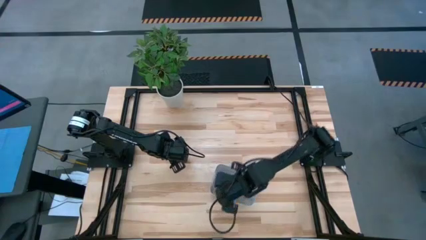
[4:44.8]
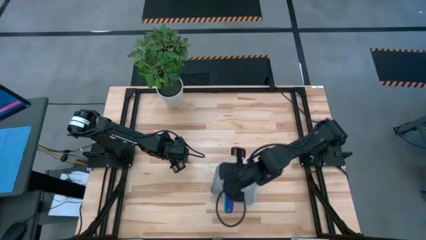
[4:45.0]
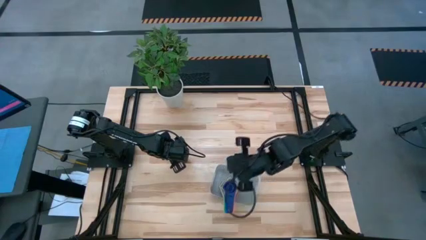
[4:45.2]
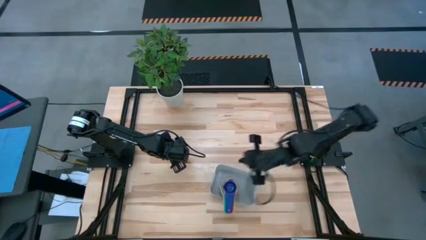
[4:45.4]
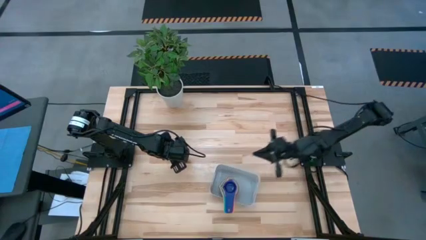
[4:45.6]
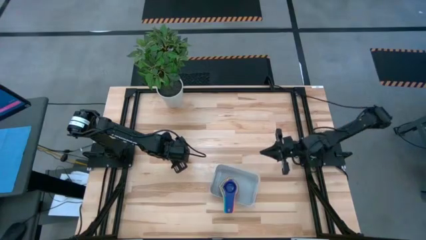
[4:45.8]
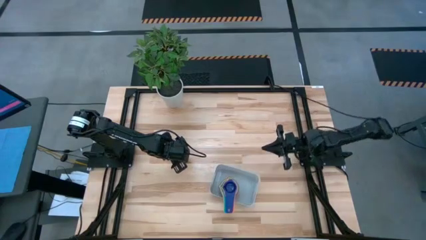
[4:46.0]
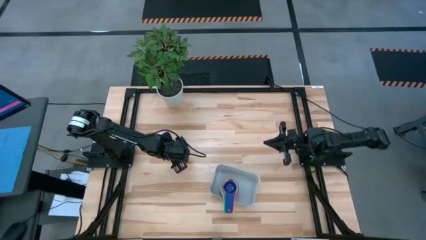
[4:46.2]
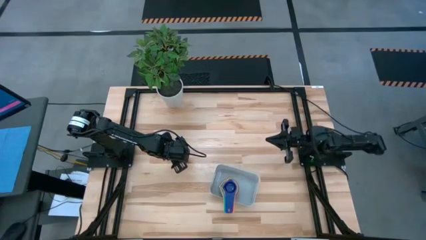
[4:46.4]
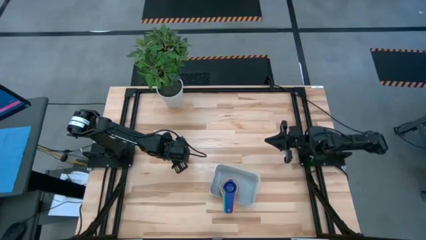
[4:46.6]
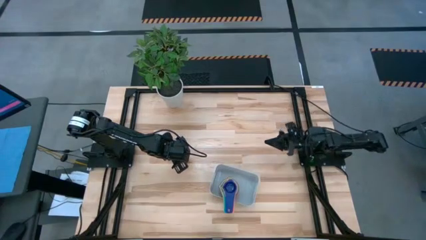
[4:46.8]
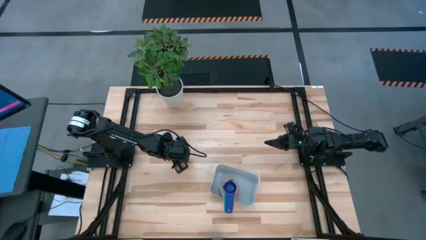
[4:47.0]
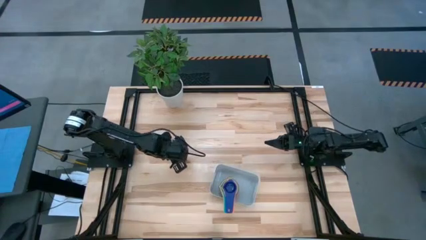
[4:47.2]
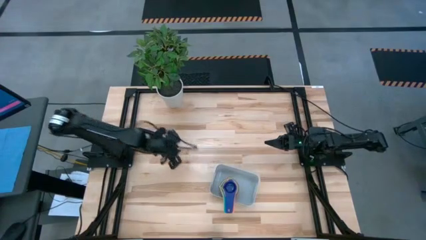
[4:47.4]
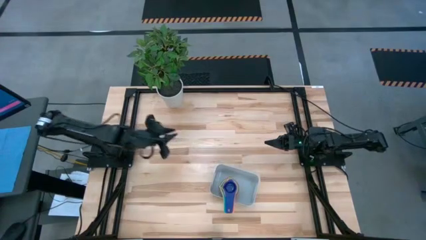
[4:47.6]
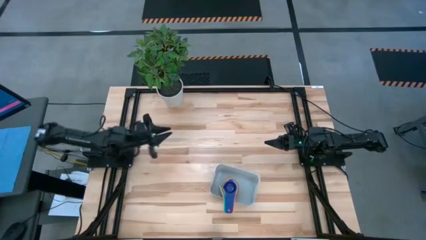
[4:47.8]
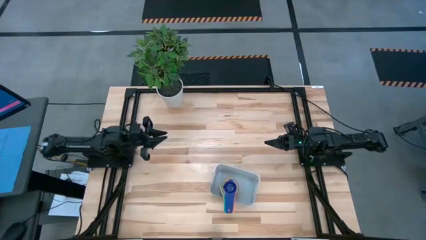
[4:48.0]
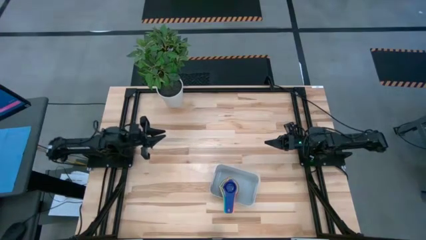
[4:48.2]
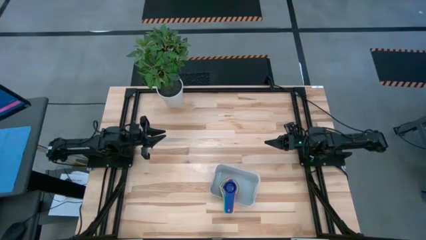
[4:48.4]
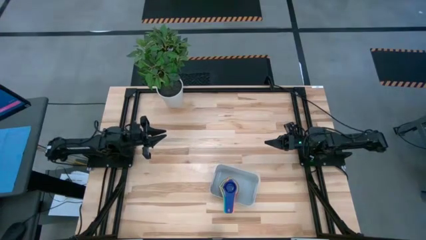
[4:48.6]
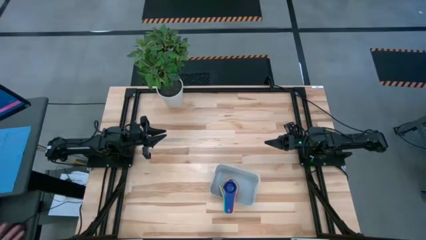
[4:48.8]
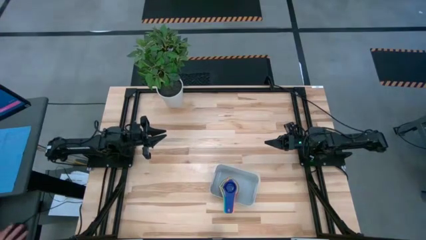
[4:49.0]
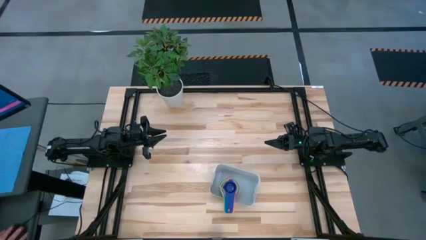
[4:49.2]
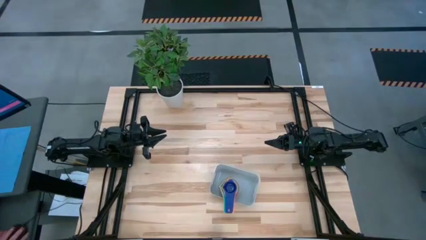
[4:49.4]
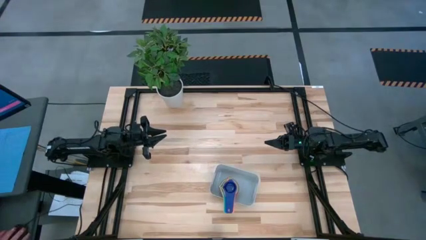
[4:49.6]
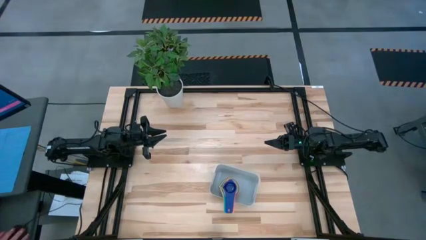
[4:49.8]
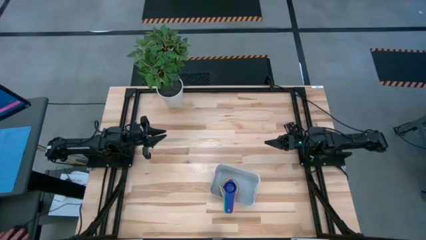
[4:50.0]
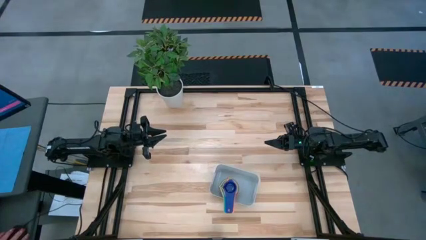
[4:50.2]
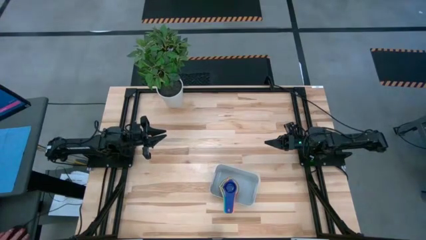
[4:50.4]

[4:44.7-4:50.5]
Task: Nest measuring cups in basket
Return to Home Position

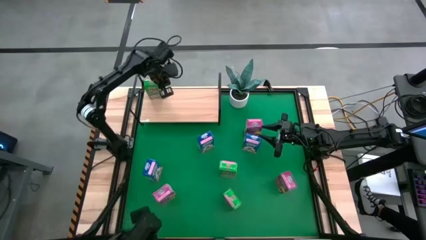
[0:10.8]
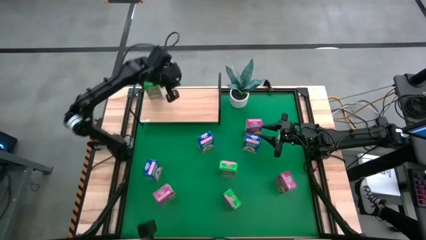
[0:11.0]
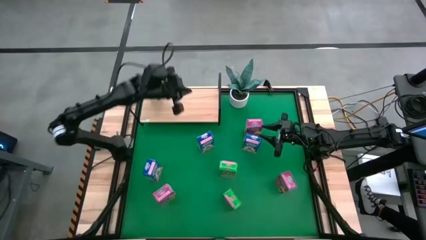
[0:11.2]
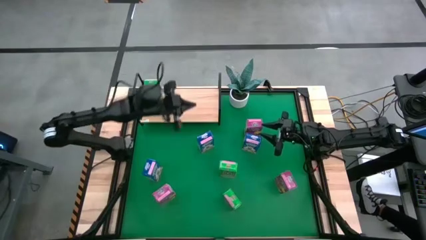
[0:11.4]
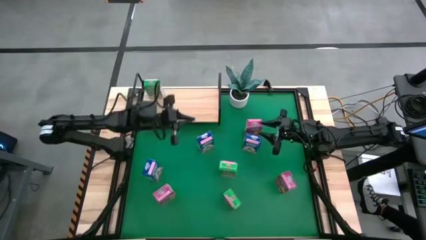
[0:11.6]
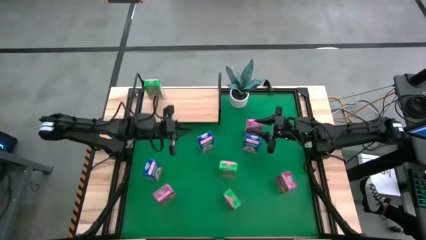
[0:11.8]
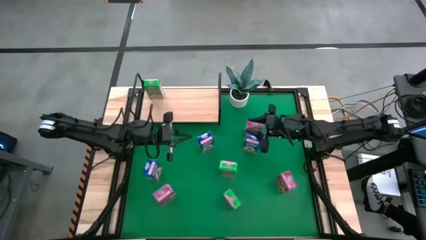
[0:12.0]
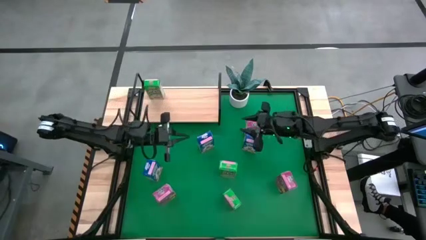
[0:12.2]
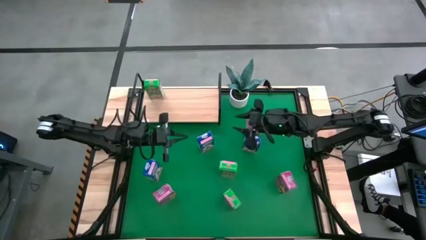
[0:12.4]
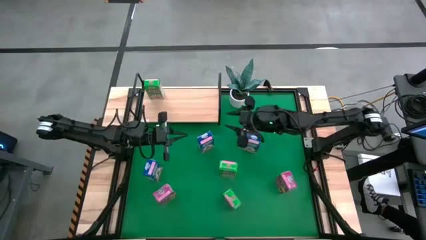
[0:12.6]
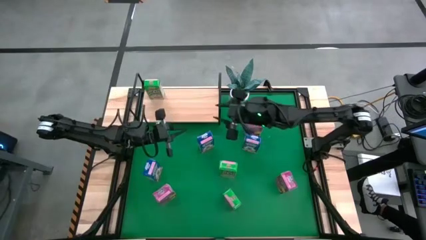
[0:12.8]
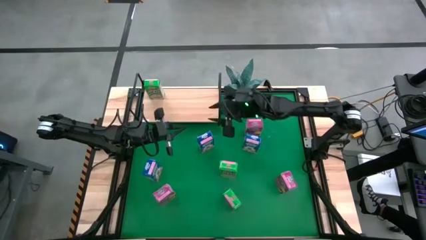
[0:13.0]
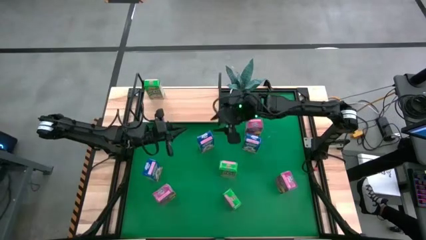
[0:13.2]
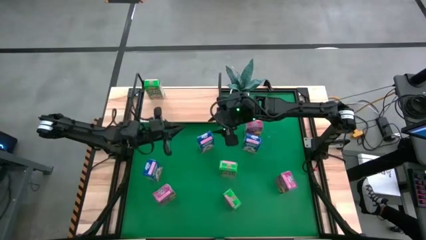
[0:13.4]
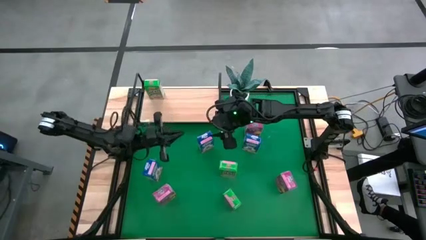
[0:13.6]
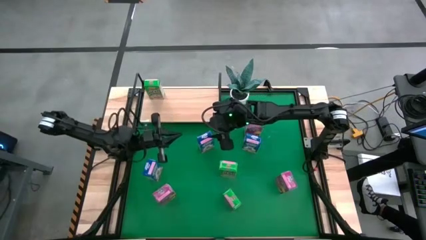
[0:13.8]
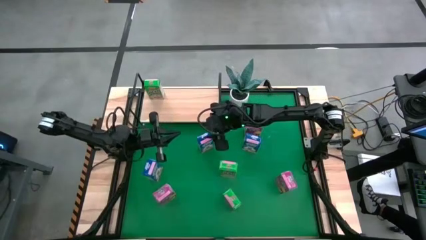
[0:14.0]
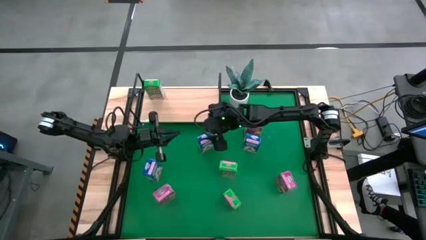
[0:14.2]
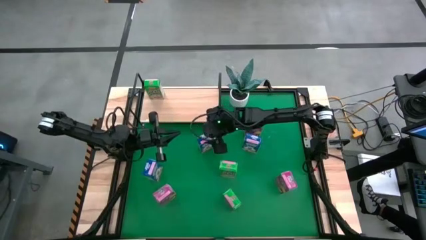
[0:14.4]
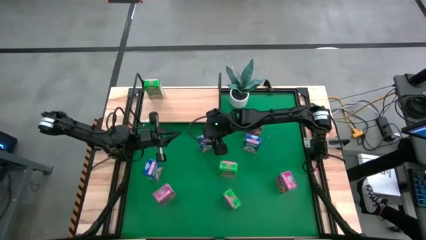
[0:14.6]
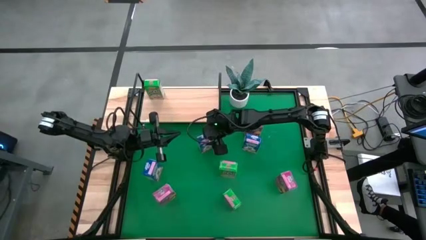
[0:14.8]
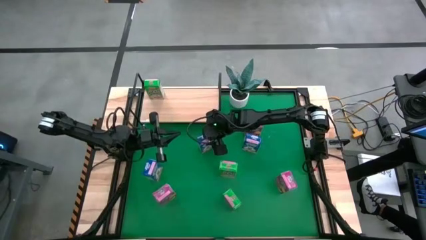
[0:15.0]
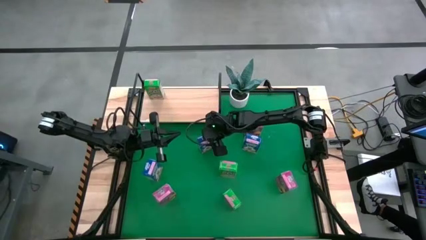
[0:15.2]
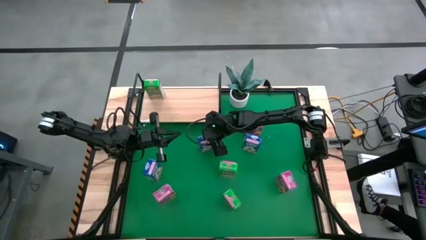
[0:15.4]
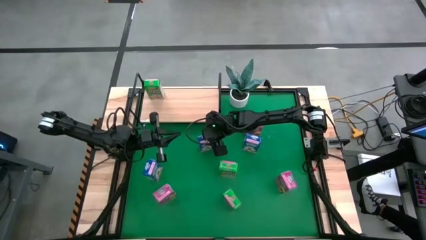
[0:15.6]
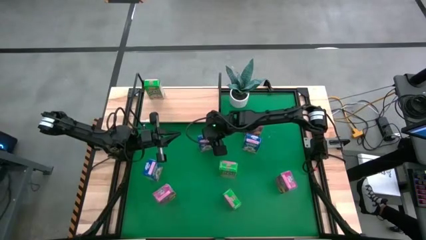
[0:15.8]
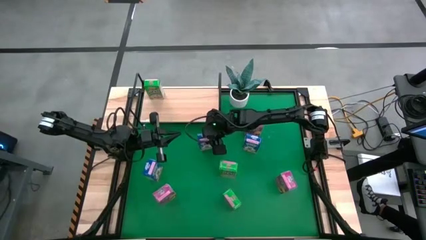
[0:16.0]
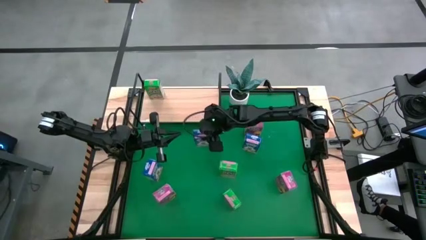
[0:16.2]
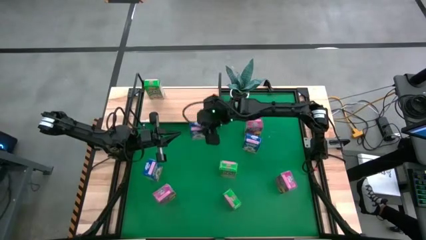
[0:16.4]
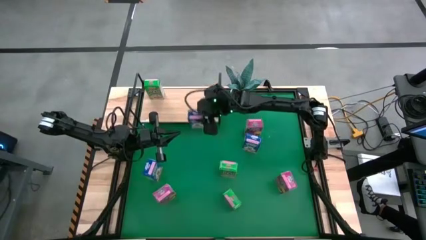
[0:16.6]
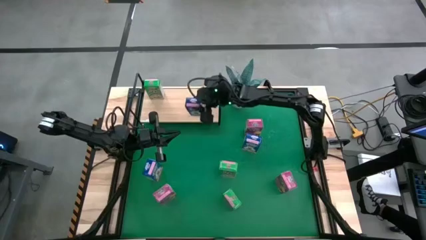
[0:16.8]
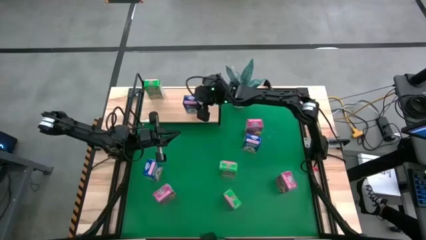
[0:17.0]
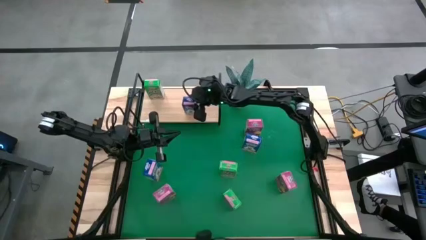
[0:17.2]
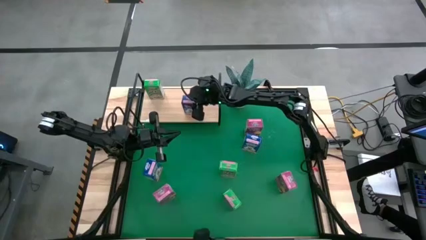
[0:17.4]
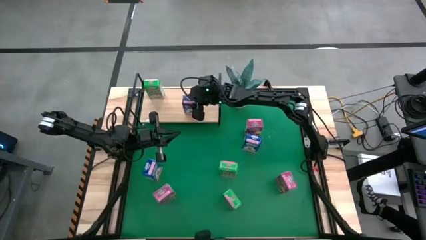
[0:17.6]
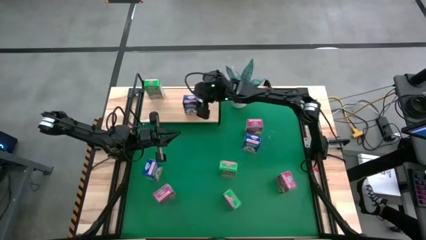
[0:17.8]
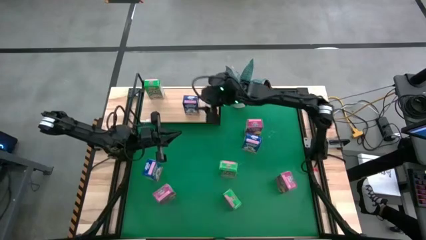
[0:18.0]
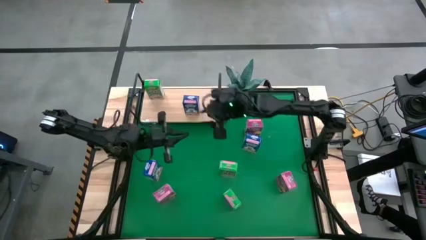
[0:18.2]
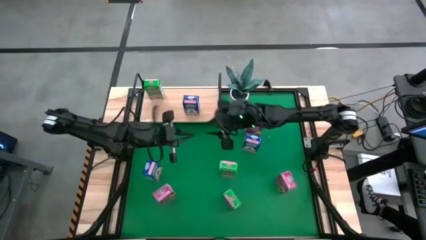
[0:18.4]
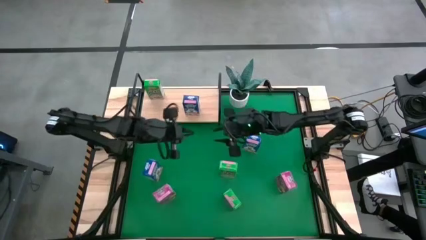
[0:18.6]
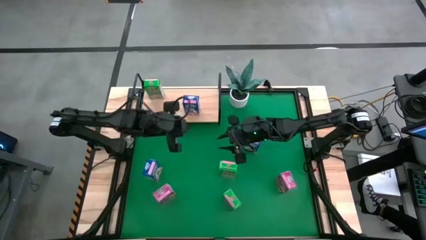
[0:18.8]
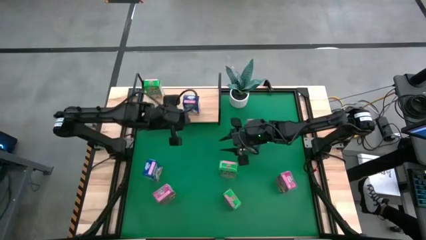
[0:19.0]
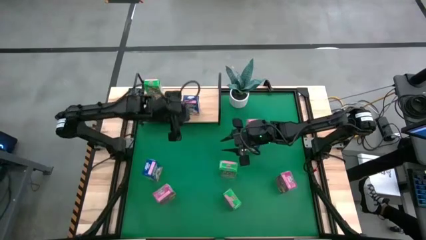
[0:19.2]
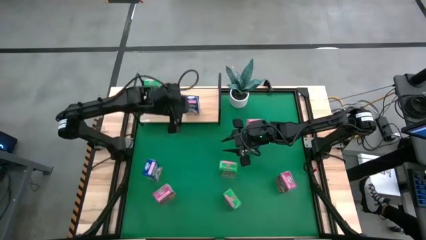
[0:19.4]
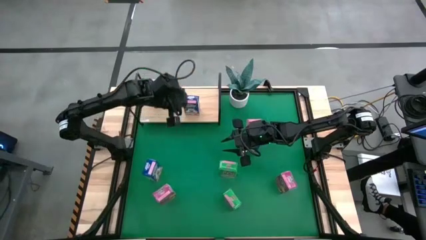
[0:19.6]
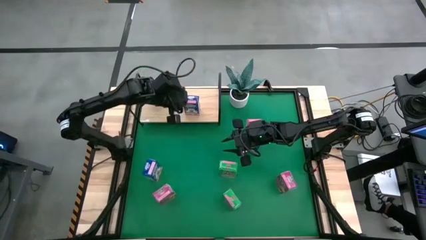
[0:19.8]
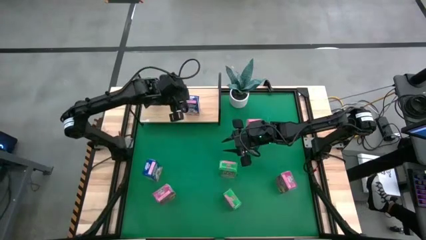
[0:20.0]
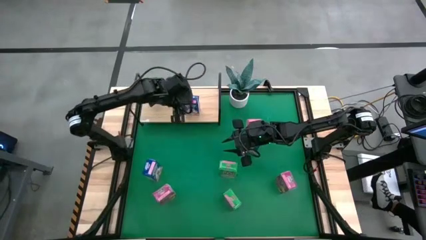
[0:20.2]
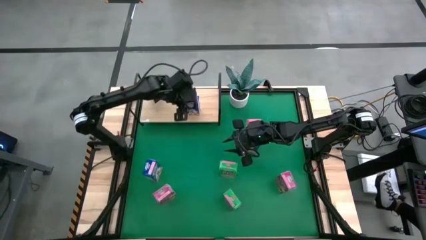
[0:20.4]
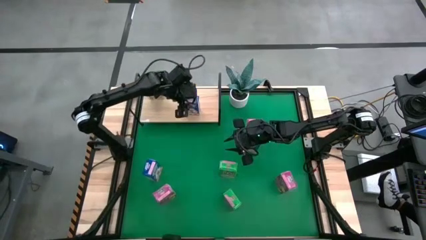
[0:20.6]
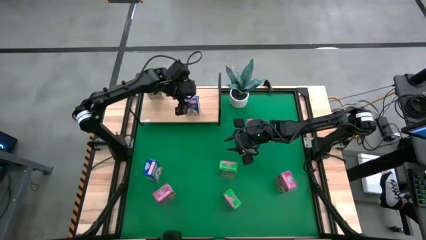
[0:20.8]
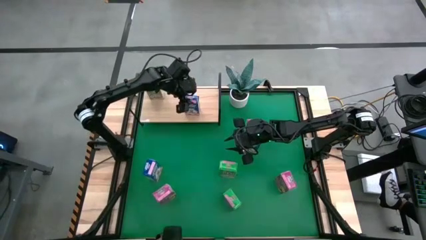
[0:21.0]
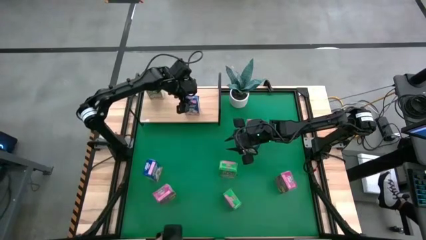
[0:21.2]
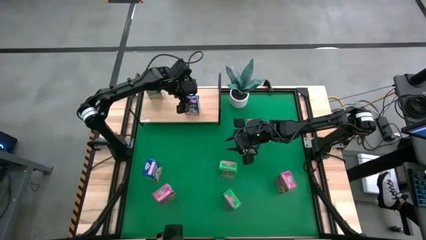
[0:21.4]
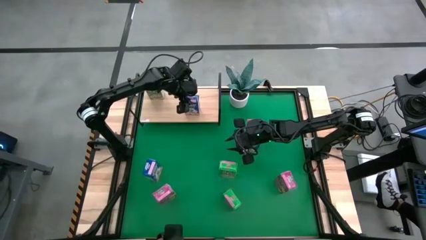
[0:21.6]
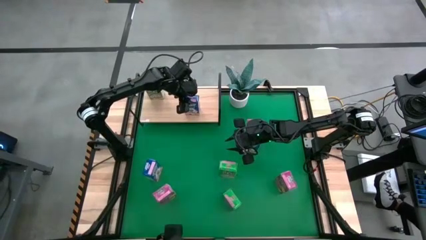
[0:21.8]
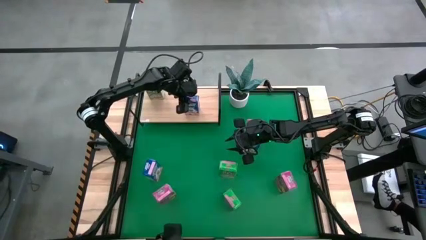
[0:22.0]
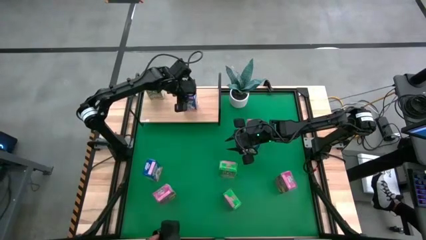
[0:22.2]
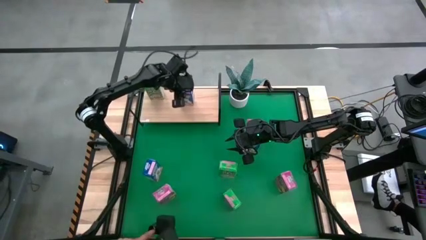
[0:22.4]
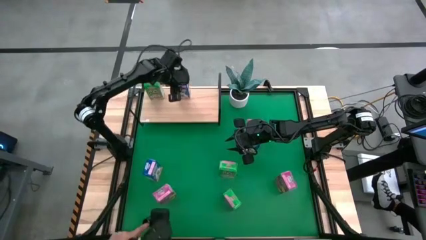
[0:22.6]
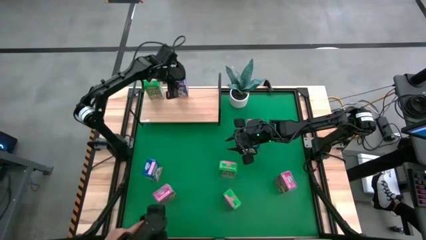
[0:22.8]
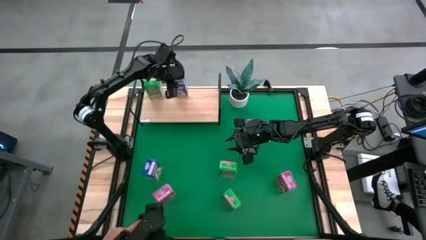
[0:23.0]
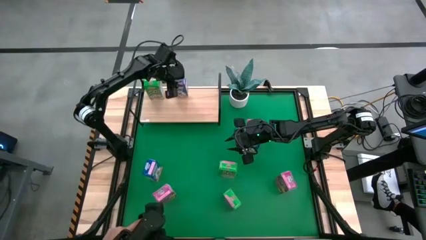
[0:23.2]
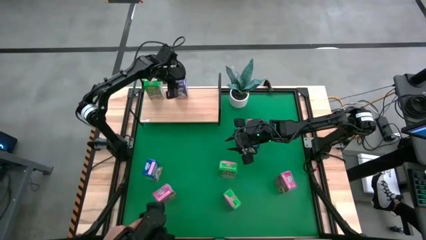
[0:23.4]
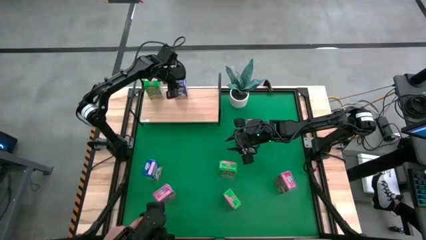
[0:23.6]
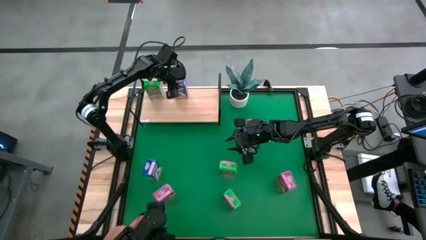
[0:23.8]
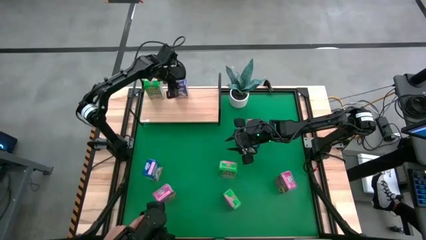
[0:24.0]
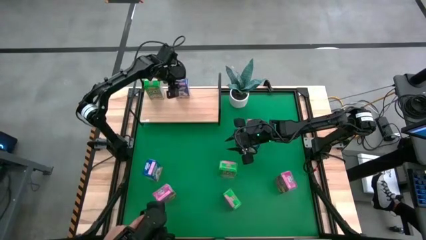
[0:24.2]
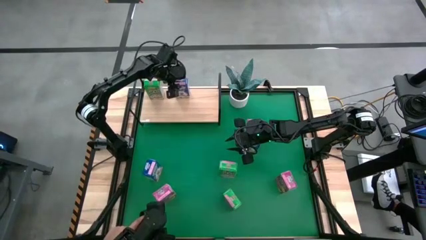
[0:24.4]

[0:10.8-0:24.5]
Task: Stack cereal on shelf
Put the top left blue cereal box on the shelf
